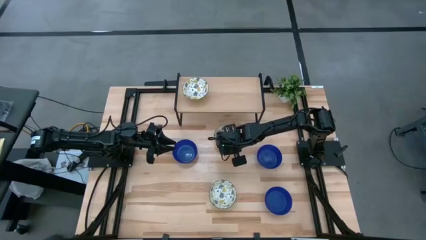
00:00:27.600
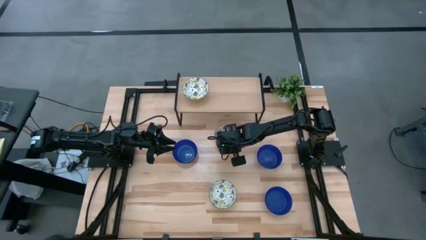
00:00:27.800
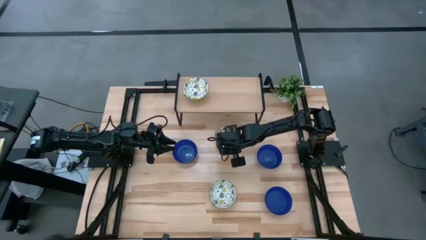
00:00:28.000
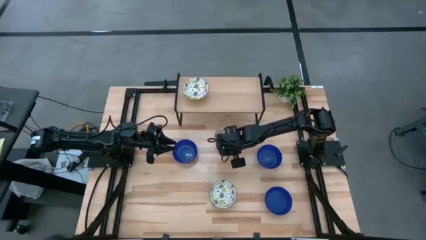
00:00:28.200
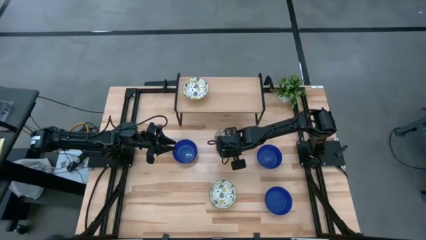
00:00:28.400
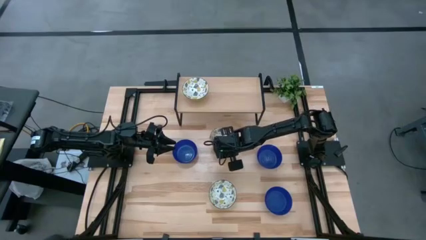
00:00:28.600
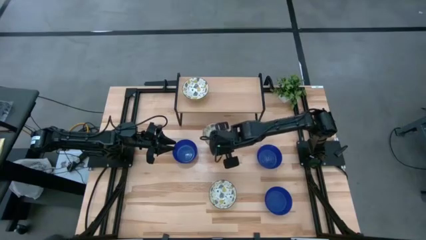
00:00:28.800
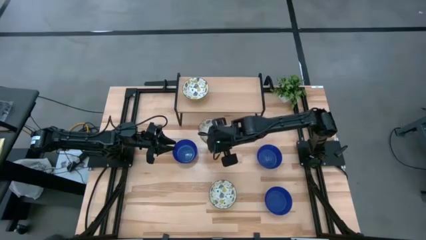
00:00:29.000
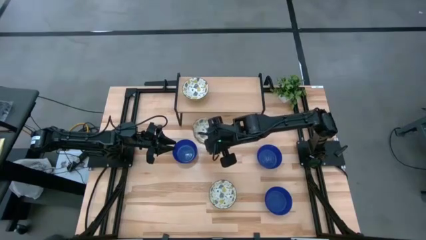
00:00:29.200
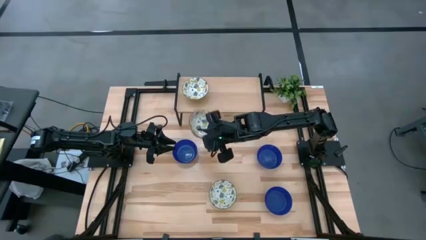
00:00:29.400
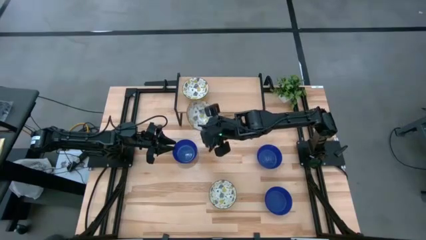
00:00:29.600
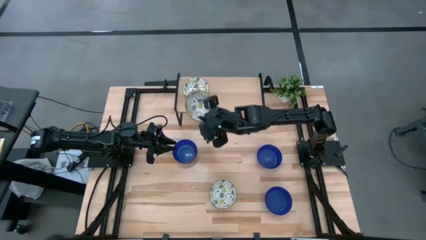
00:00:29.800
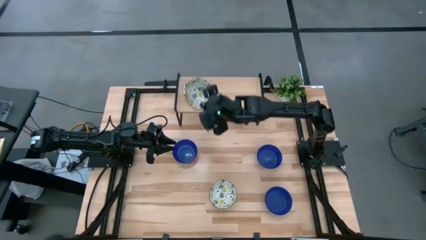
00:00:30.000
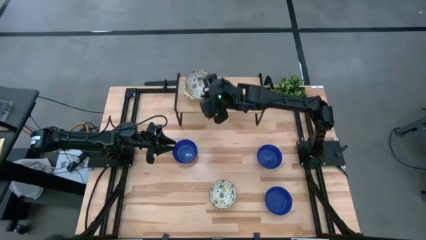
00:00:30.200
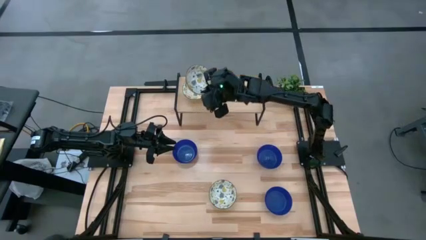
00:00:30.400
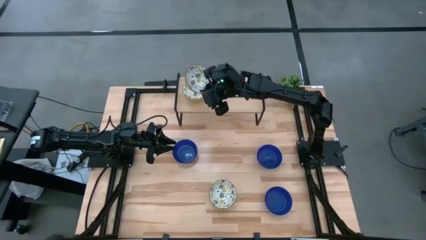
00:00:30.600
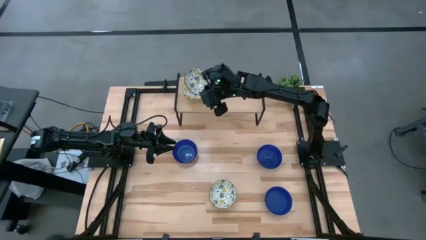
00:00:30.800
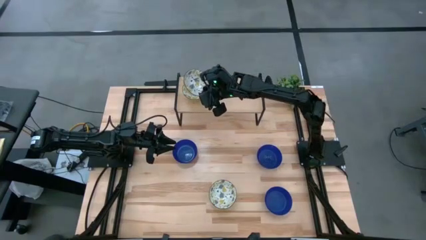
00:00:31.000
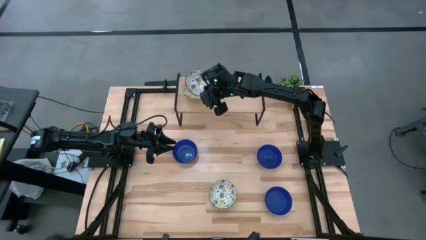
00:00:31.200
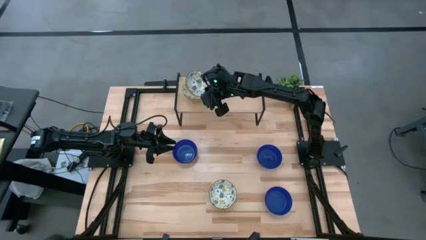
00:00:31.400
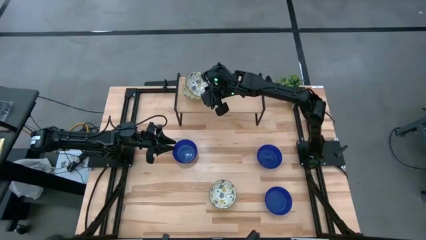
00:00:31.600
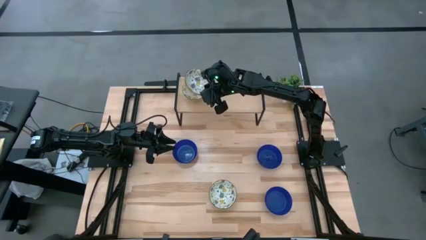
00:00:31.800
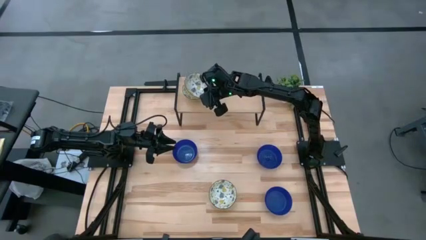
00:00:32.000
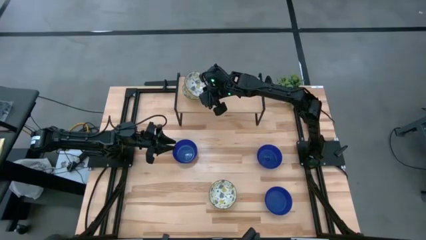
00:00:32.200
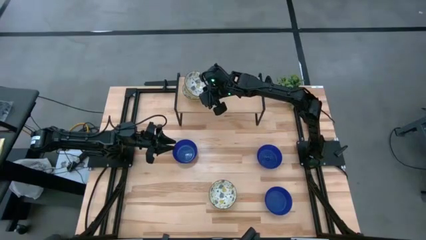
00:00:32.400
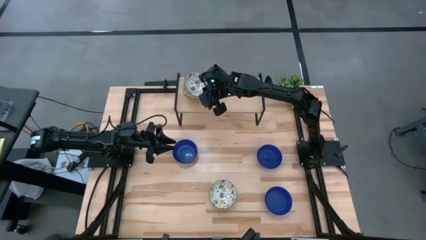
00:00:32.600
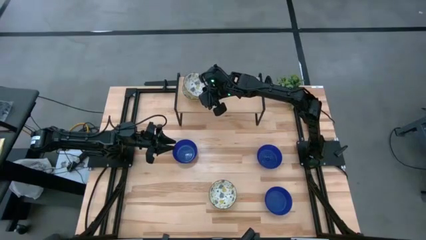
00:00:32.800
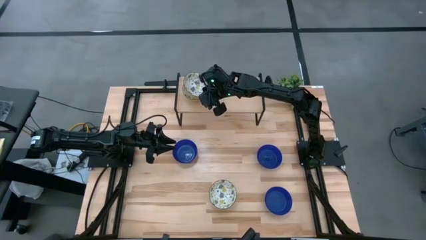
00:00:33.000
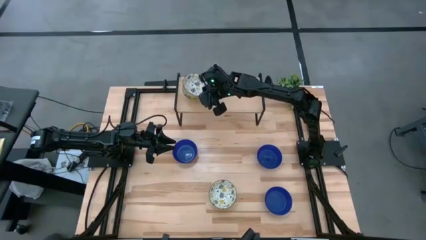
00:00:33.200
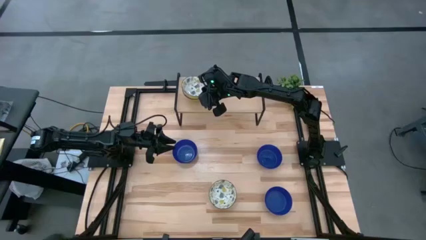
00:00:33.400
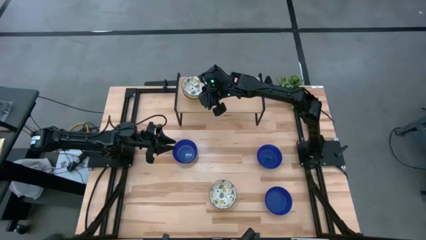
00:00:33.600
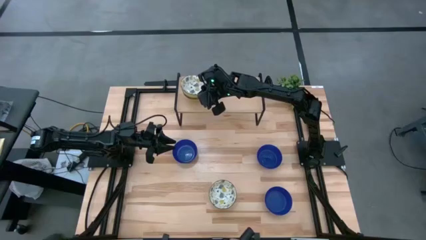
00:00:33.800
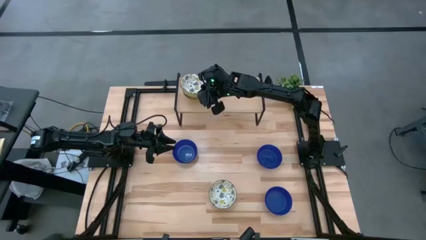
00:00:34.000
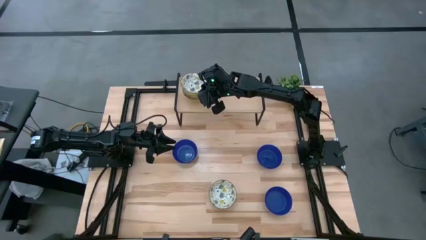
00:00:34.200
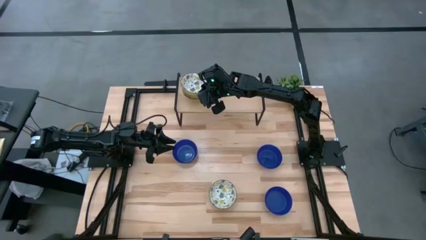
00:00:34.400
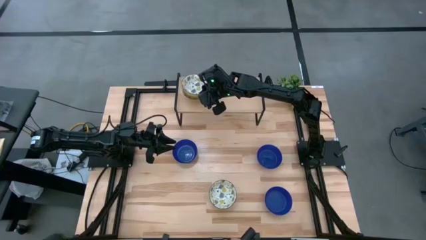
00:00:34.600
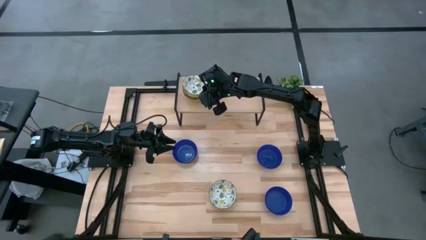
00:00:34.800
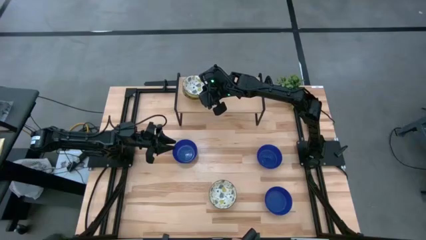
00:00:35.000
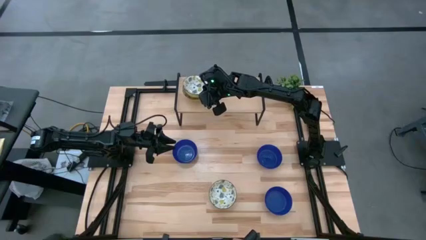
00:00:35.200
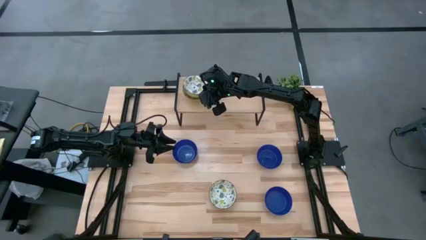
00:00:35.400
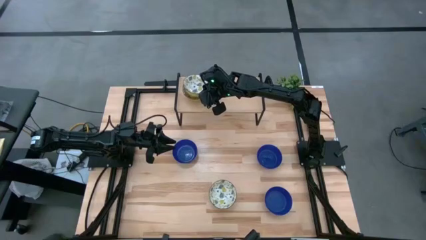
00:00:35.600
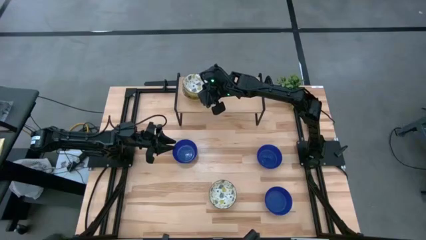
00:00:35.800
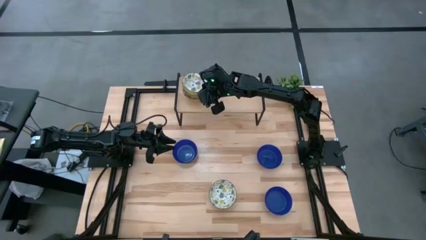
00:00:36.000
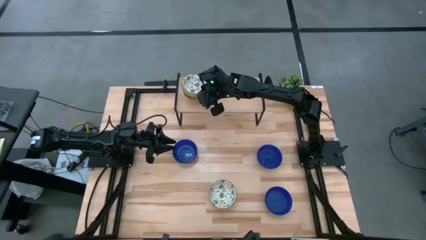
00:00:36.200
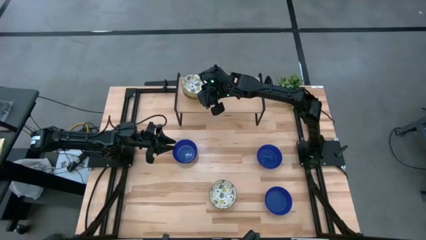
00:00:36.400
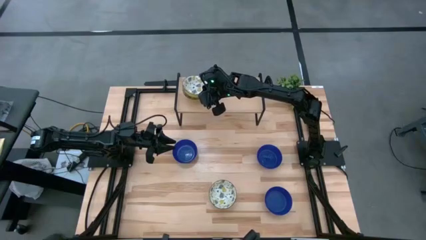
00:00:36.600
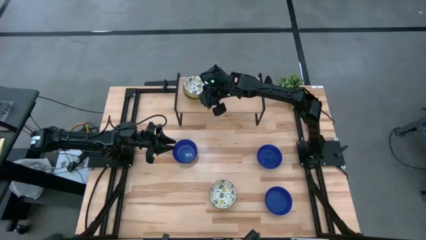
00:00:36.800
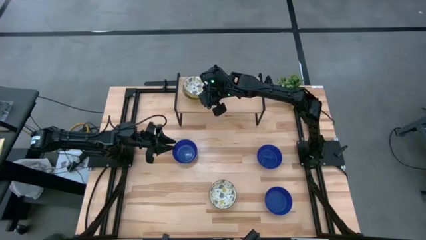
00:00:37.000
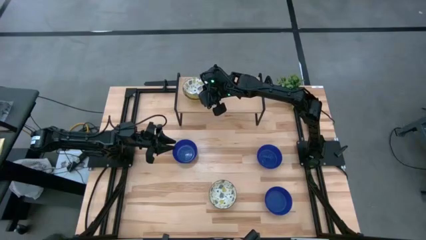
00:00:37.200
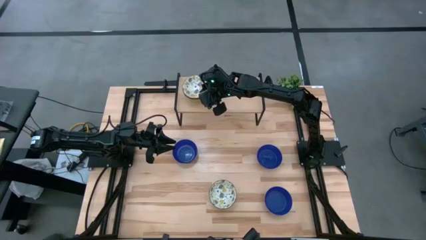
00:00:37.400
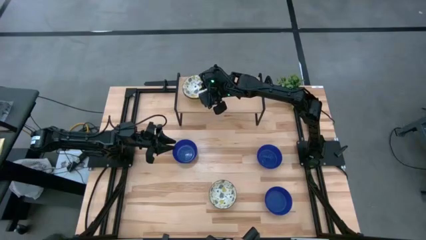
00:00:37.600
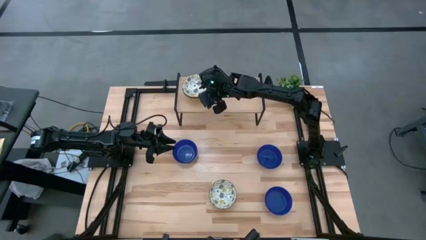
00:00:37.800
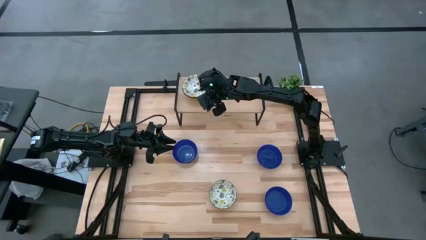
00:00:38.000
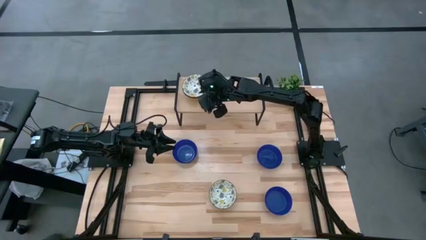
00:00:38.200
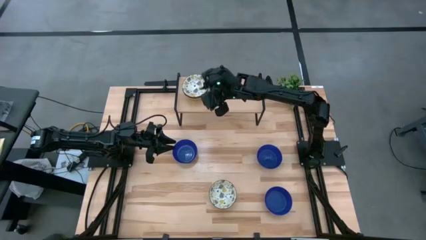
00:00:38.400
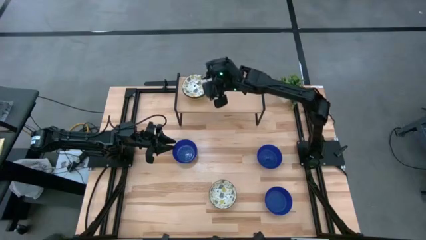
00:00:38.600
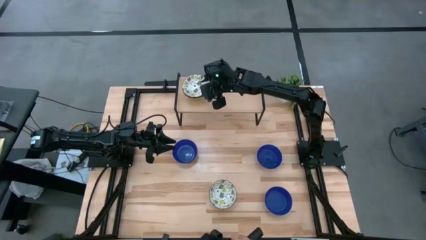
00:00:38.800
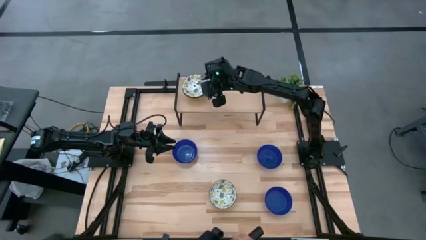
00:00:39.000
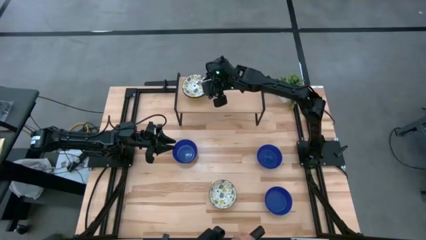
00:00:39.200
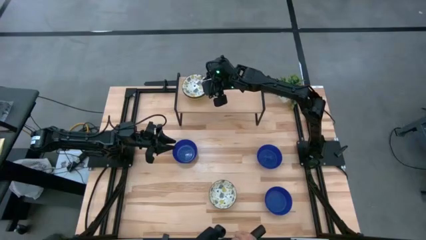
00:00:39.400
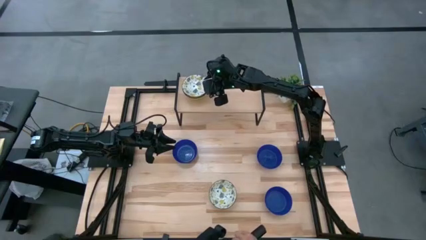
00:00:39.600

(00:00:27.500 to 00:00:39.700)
Task: Pick & Place Mini bowls
Stack the top yellow bowl on the yellow bowl on the shelf
